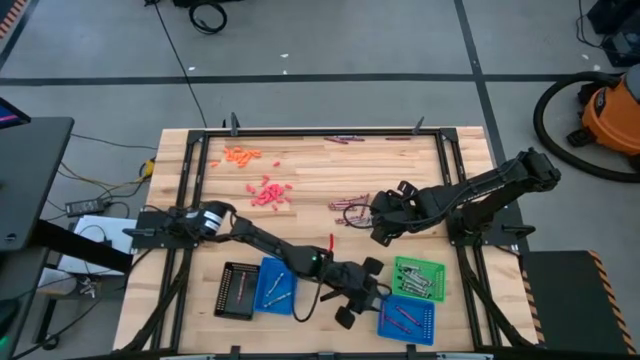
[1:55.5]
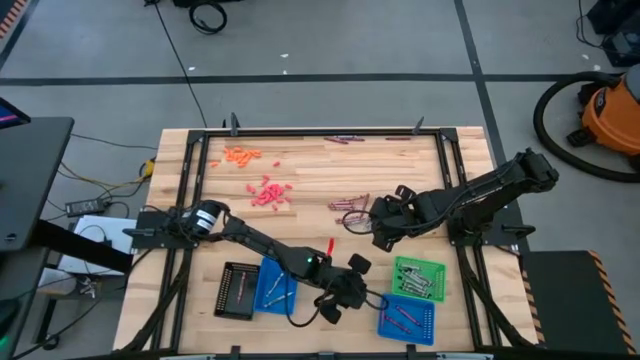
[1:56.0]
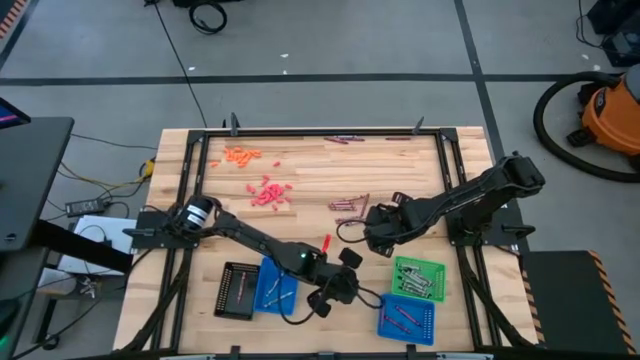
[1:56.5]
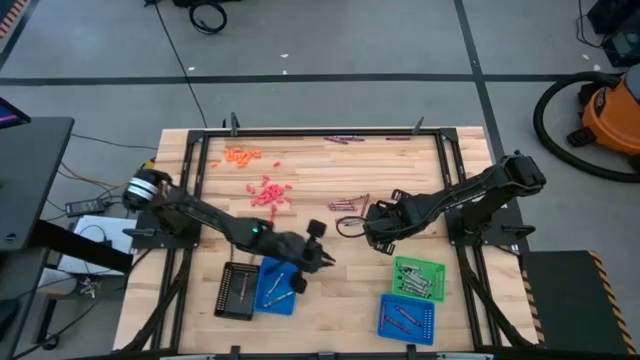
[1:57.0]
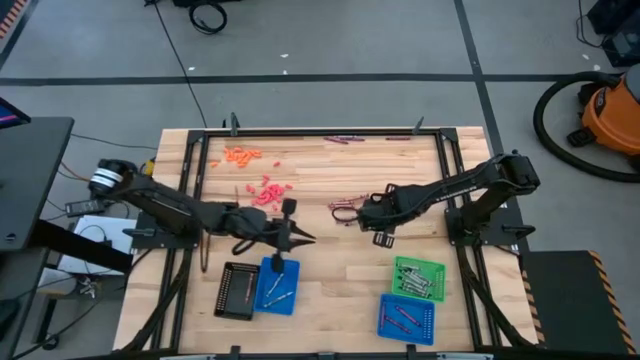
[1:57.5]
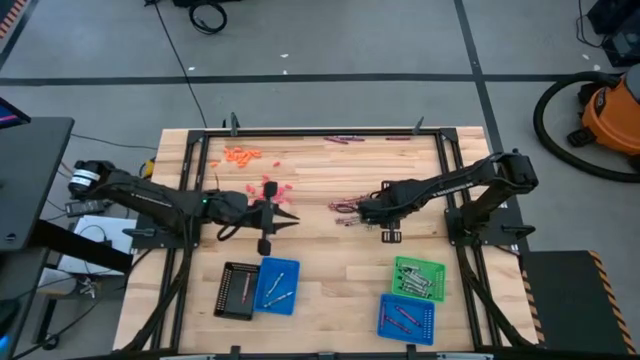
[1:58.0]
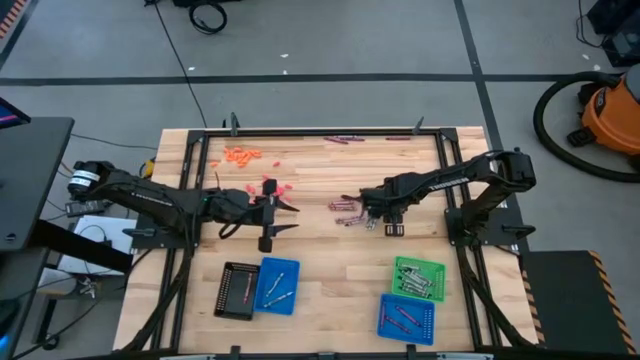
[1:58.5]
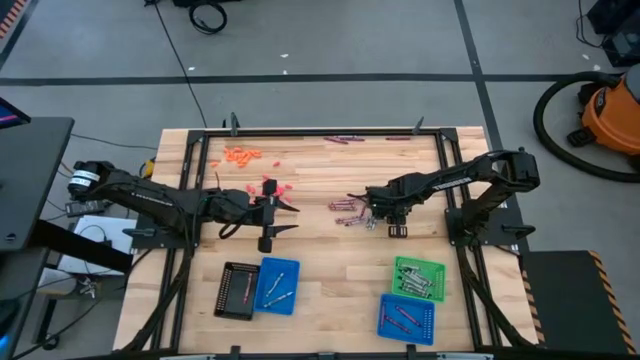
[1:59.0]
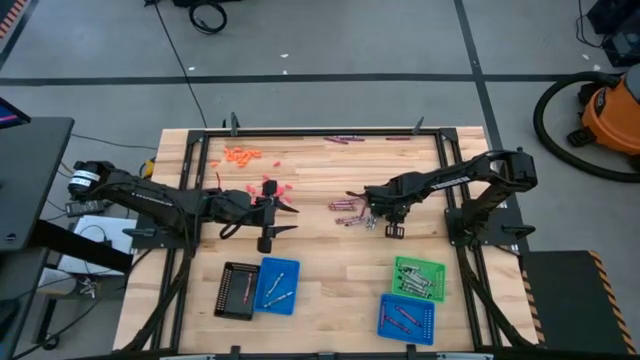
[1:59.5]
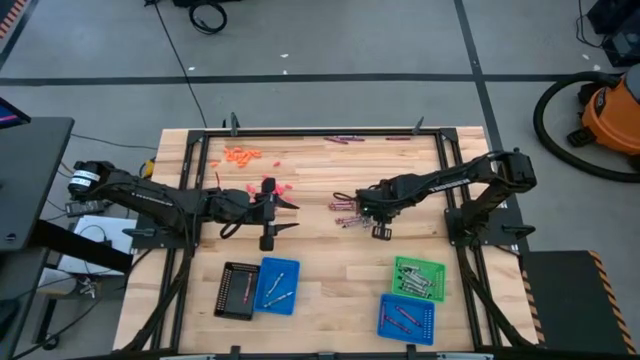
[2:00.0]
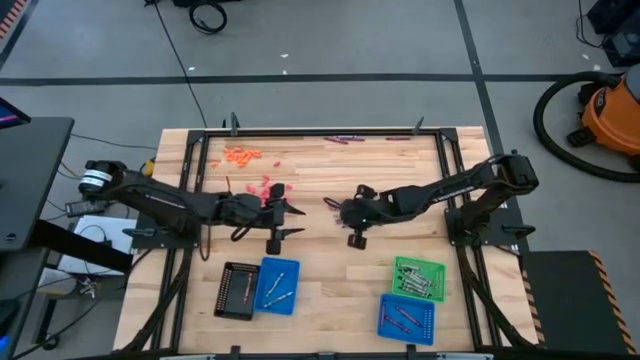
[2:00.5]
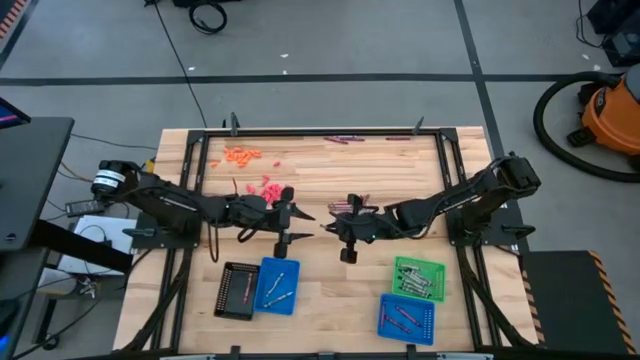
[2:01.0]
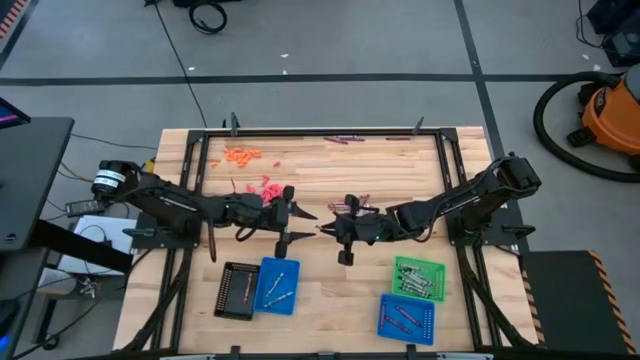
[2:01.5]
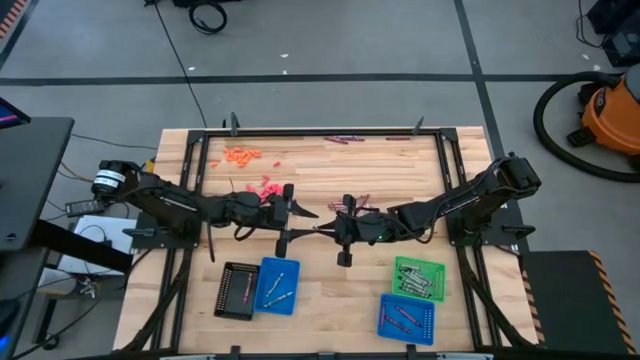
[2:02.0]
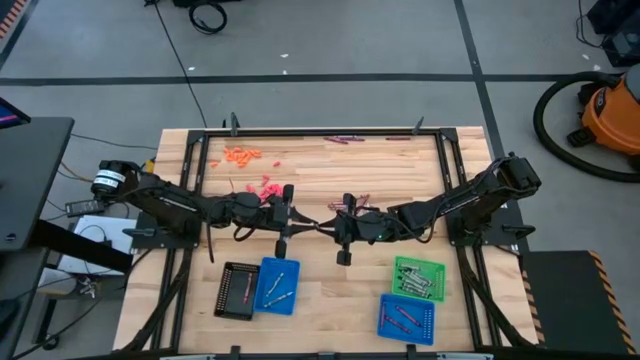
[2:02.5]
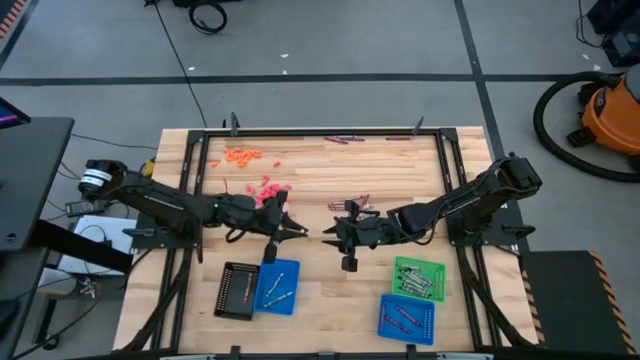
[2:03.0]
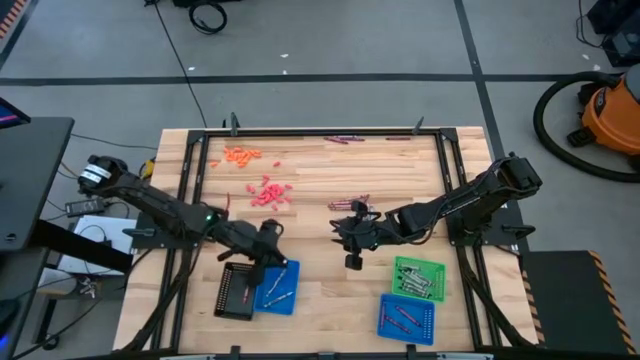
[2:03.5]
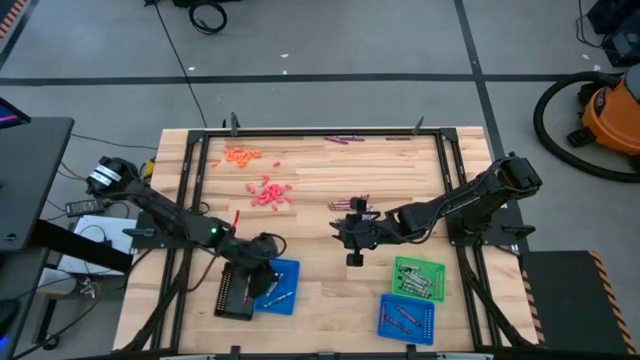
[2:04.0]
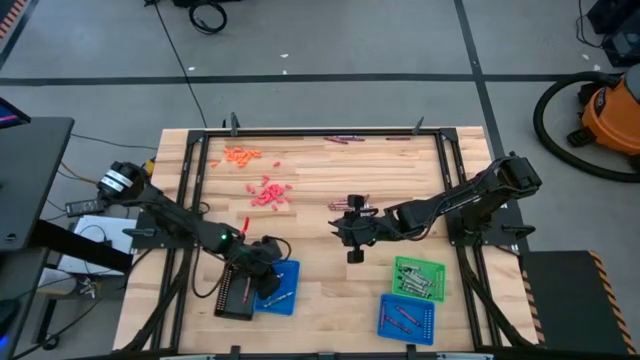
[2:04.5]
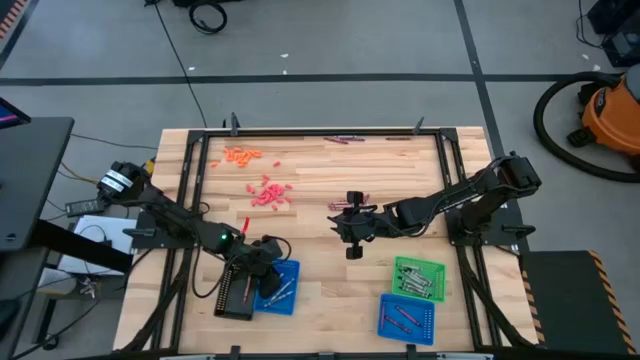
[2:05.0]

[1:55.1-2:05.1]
Task: Sort crayons
Put the white crayon into the left blue bin

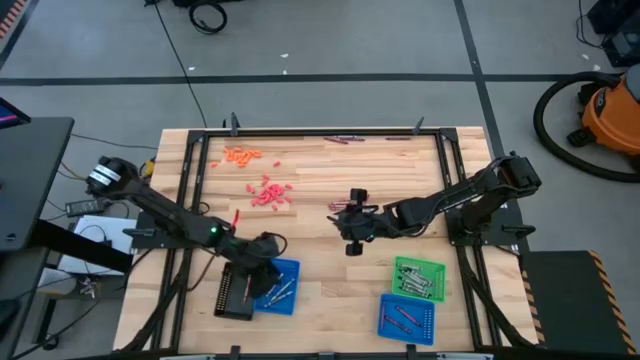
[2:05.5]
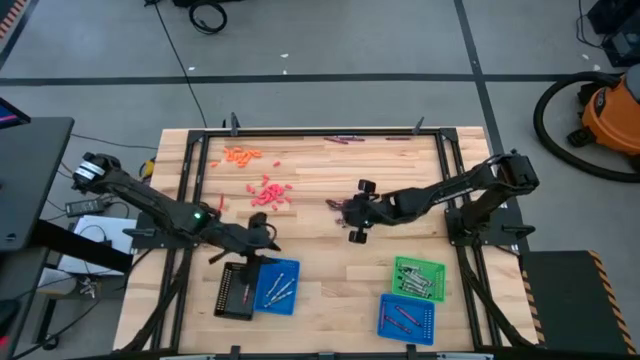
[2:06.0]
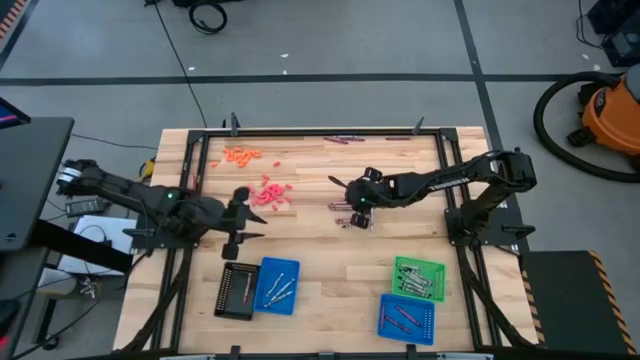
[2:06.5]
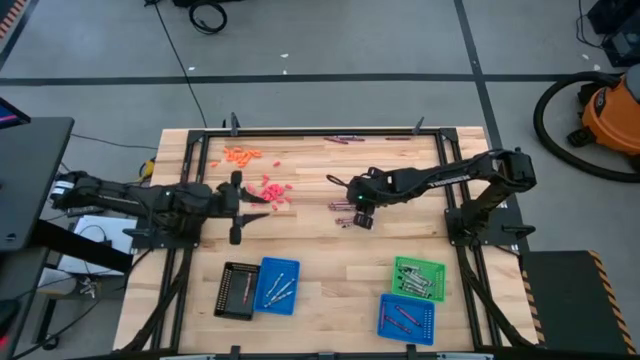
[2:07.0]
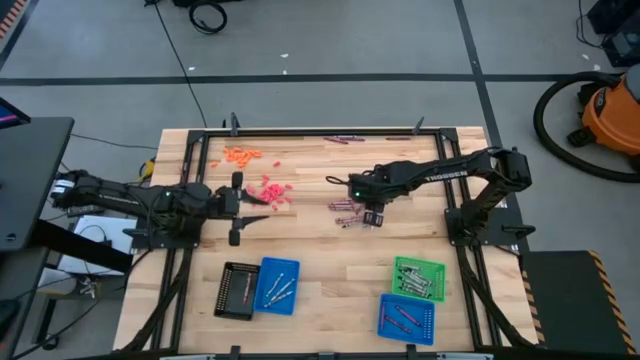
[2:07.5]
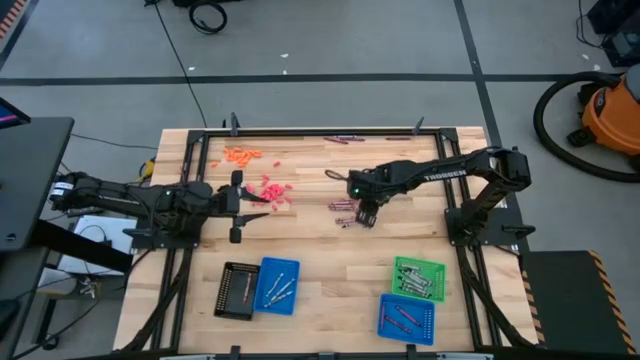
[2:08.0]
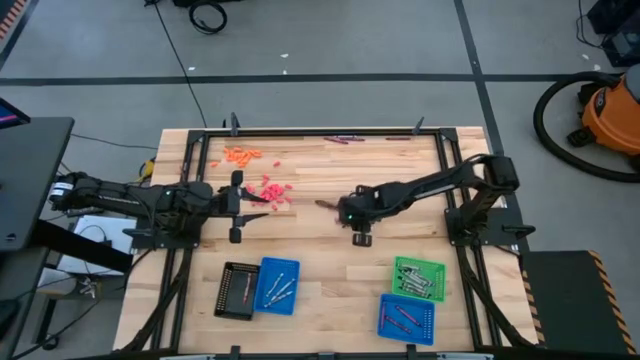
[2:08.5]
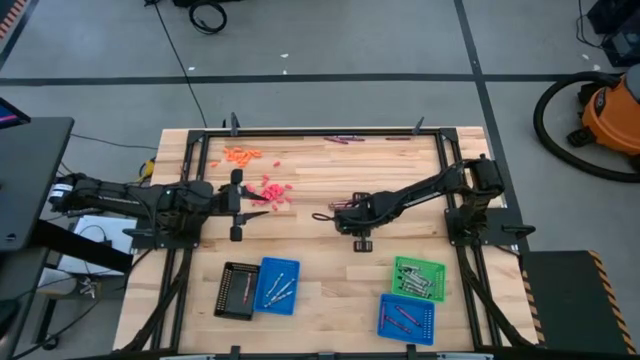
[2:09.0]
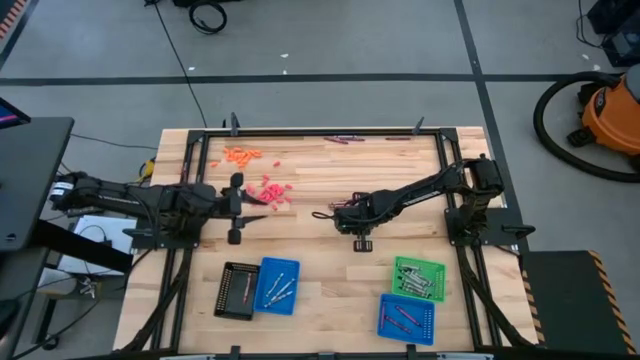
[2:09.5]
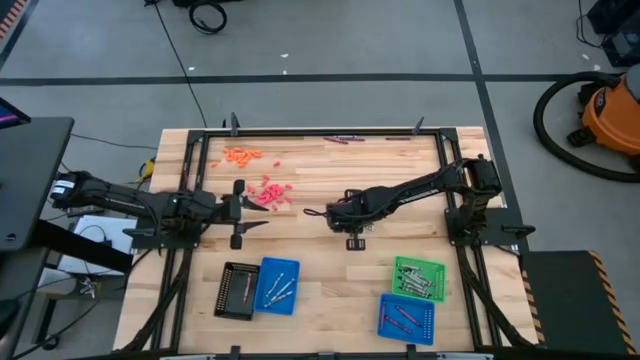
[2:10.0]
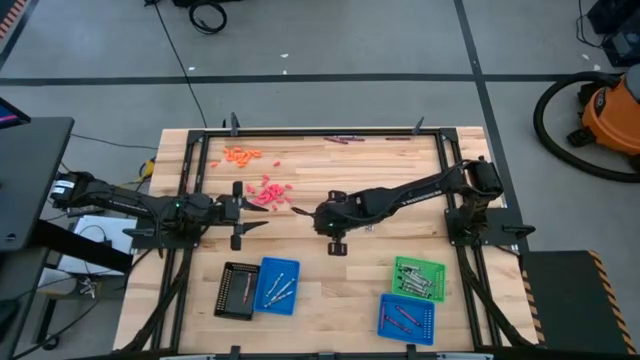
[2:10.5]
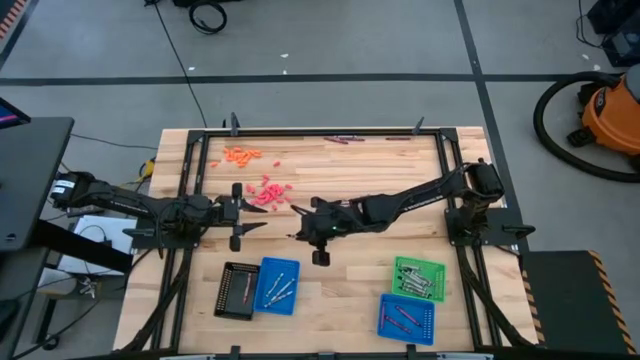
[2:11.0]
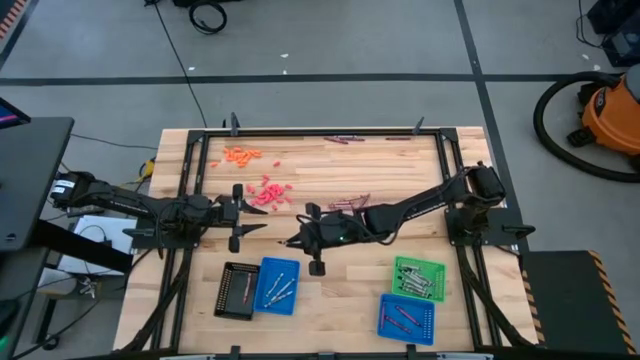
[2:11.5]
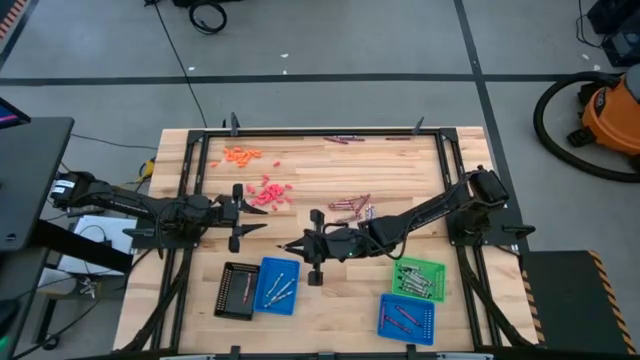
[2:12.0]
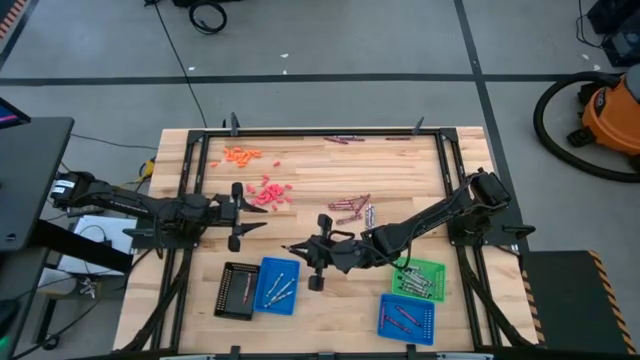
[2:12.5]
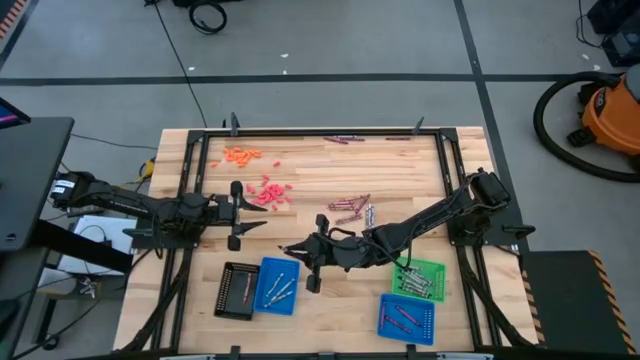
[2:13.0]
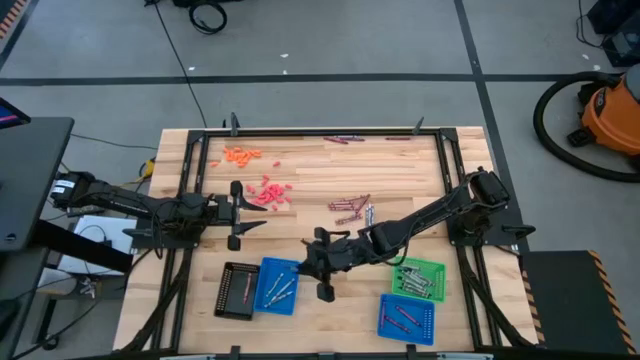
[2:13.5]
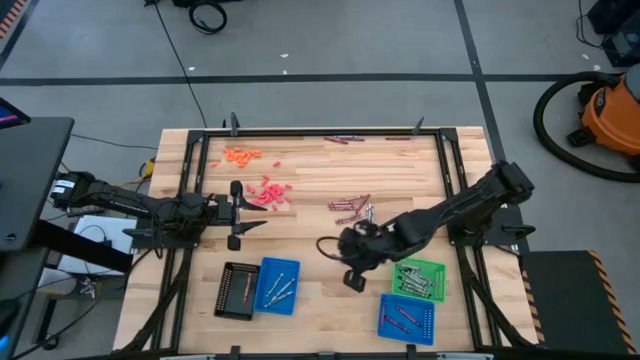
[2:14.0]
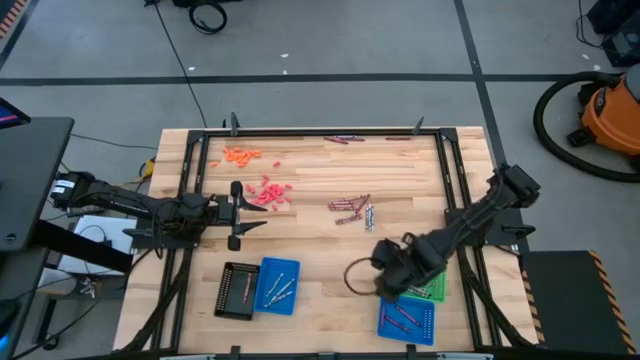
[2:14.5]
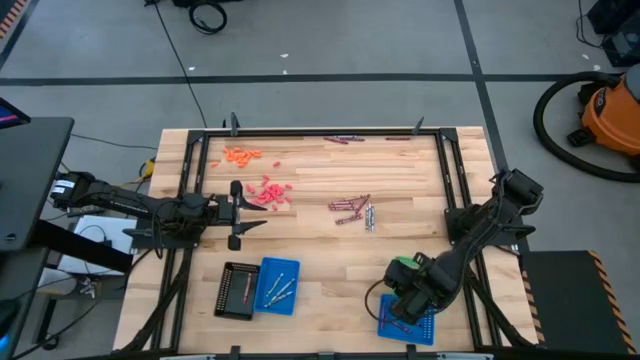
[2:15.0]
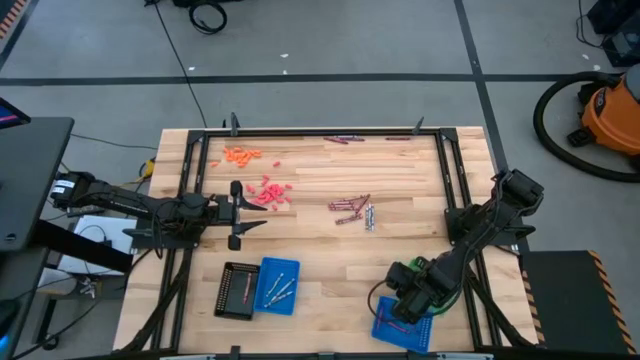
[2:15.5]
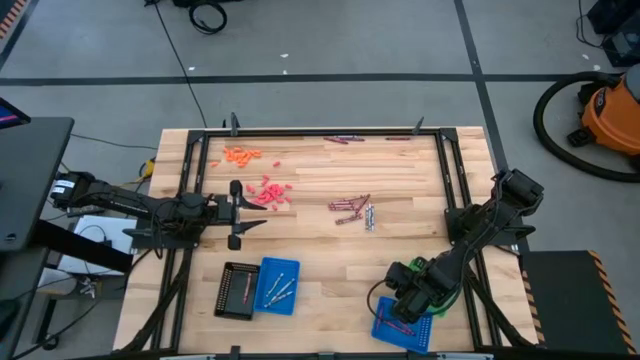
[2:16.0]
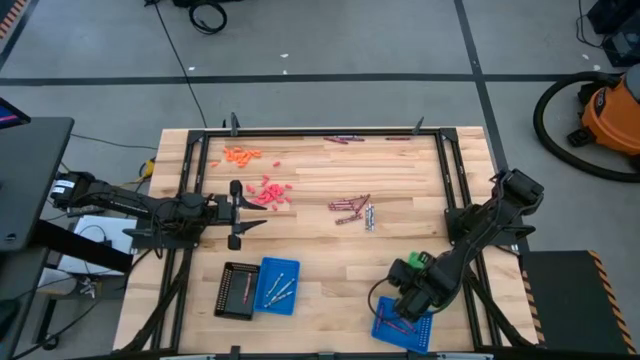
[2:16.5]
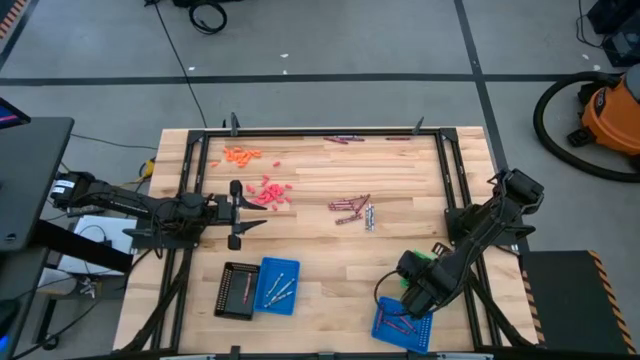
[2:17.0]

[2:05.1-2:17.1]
Put the black crayon into the green bin
